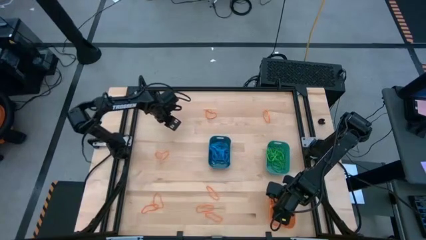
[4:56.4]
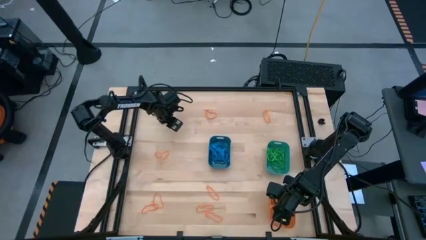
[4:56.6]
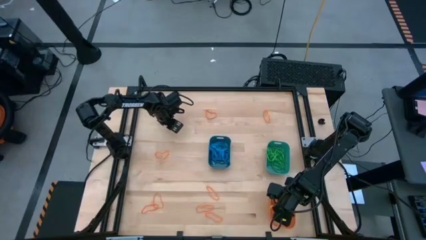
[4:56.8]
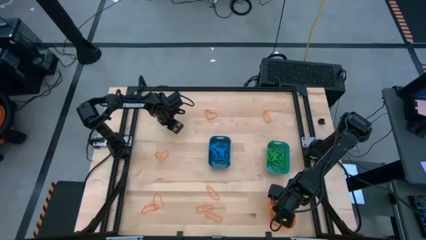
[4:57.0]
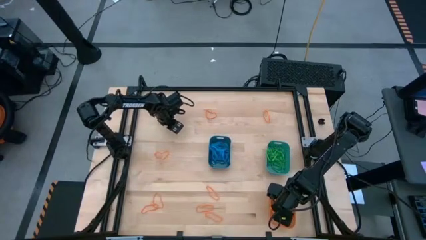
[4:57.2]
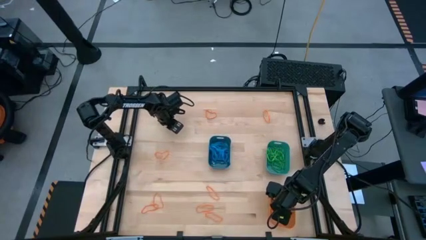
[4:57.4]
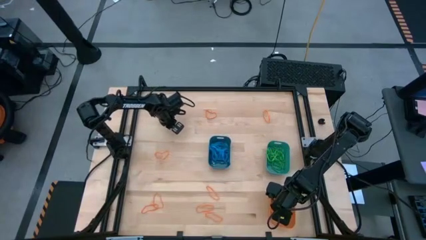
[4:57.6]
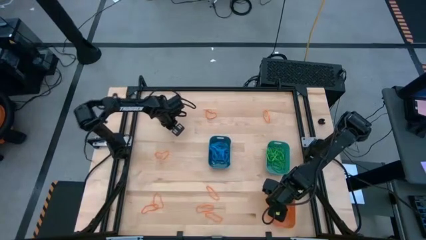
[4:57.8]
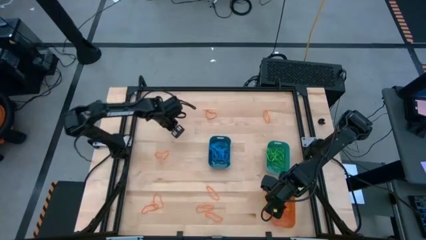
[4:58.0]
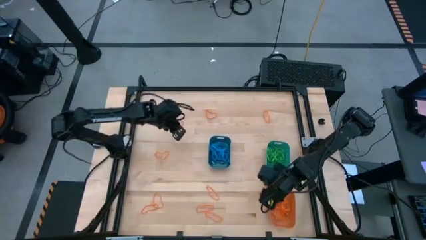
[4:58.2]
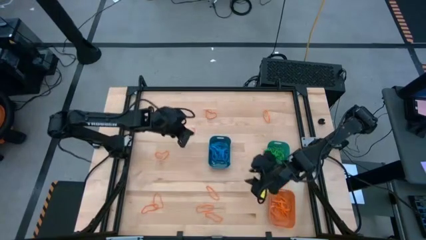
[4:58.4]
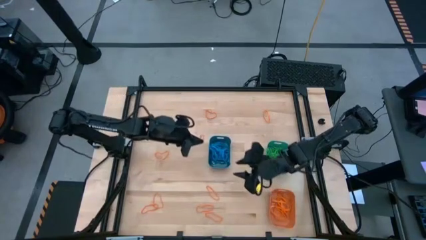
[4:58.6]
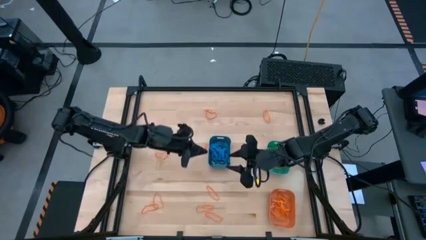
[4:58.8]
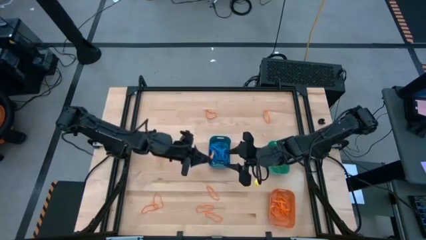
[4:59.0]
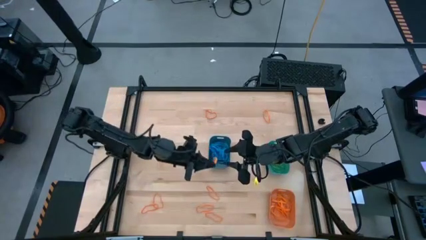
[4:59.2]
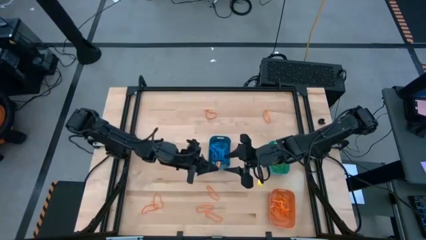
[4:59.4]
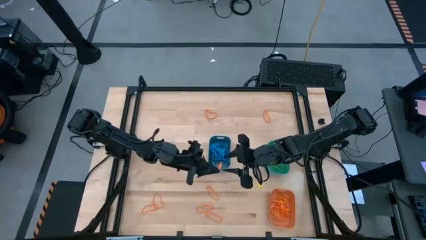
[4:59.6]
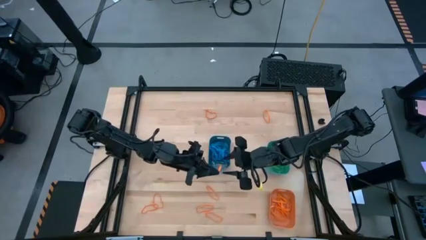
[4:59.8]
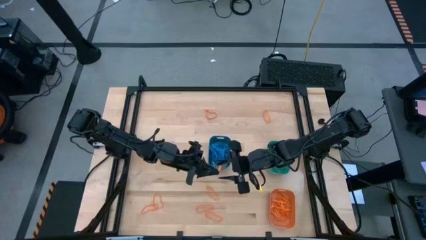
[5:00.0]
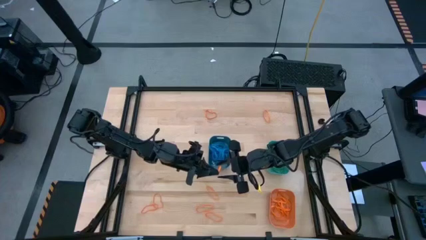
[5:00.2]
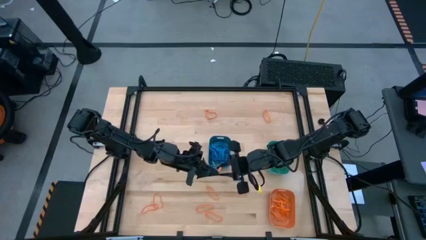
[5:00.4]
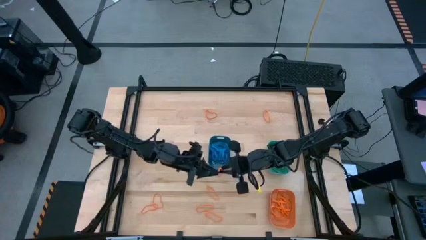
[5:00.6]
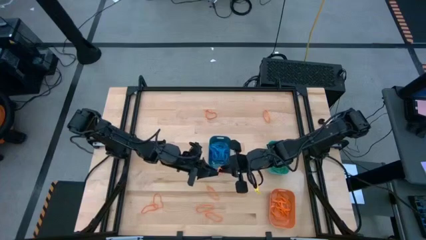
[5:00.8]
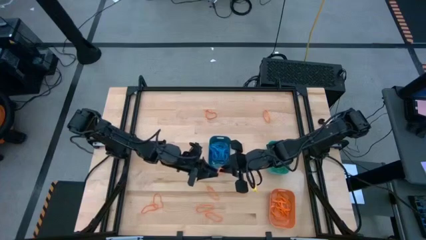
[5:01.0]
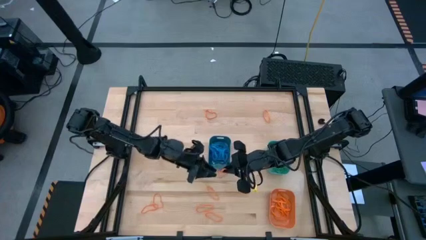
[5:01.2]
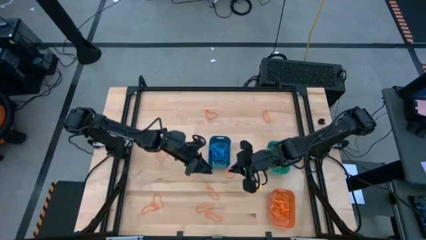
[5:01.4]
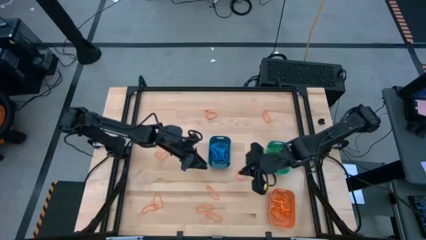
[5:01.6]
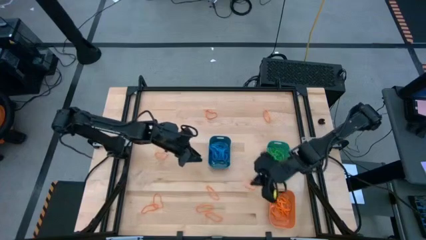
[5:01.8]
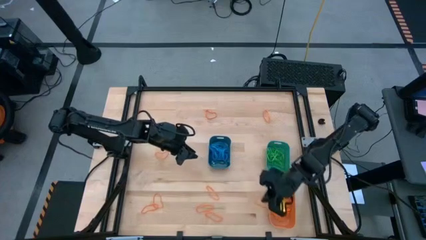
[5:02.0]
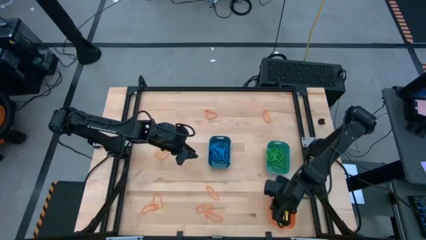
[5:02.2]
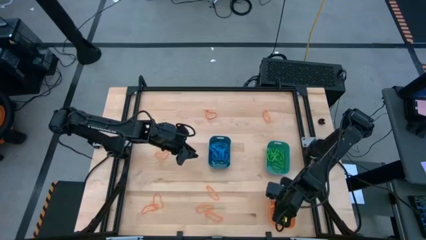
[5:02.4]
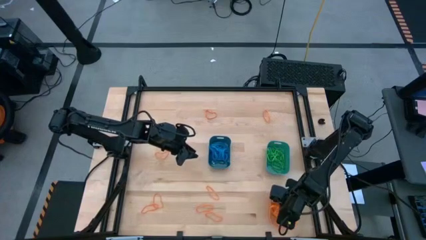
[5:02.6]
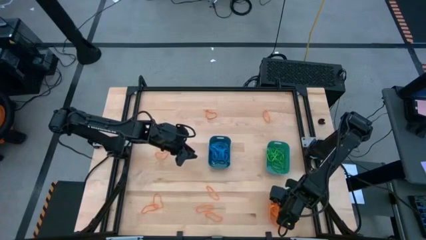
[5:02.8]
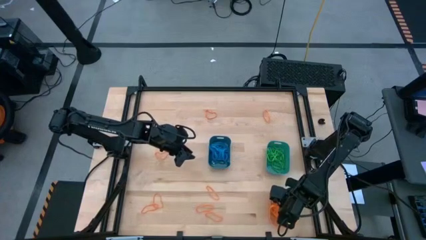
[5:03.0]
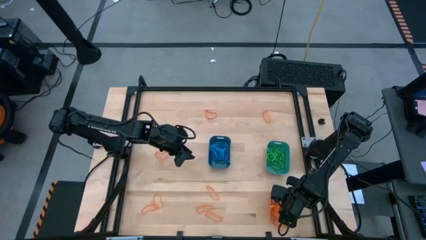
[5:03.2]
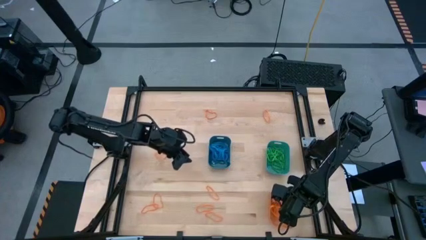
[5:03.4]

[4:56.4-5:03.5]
Task: Sort rubber bands into baskets
Put the orange rubberband into the orange bin

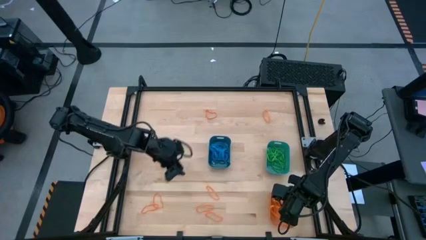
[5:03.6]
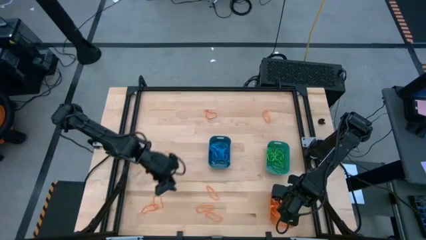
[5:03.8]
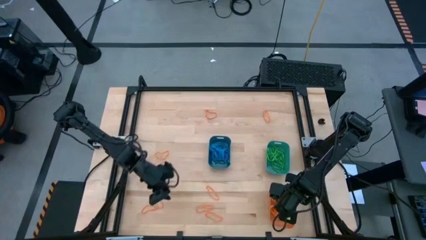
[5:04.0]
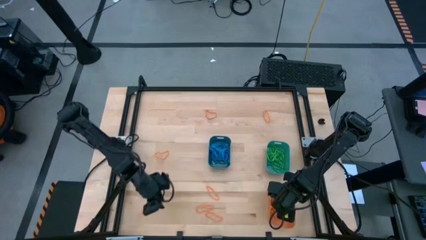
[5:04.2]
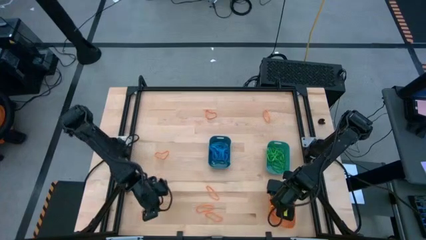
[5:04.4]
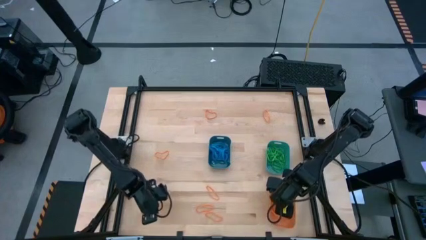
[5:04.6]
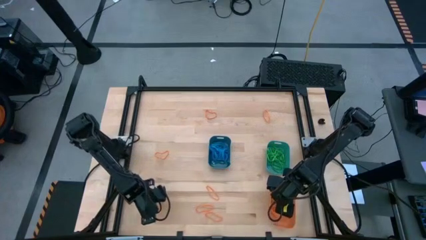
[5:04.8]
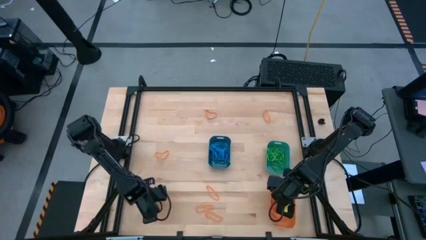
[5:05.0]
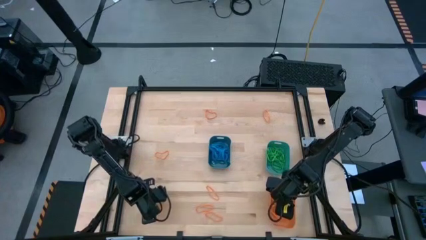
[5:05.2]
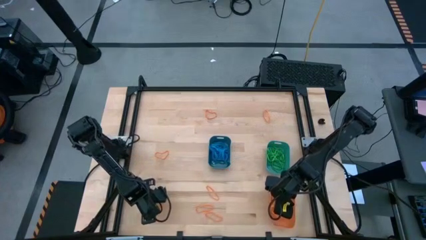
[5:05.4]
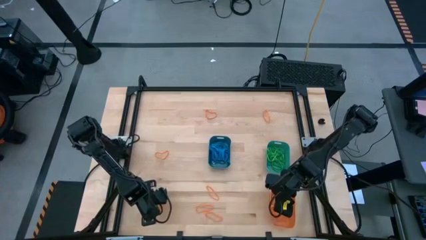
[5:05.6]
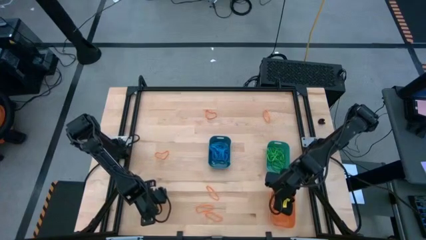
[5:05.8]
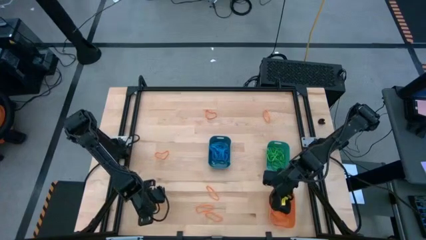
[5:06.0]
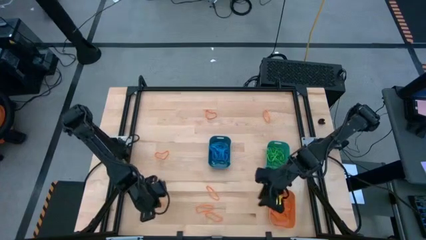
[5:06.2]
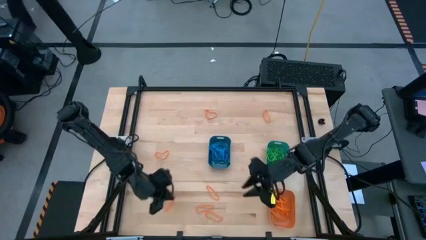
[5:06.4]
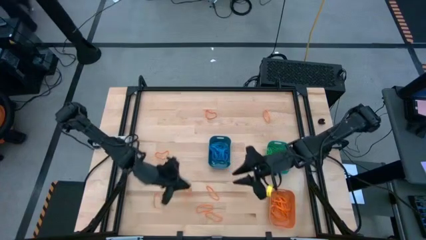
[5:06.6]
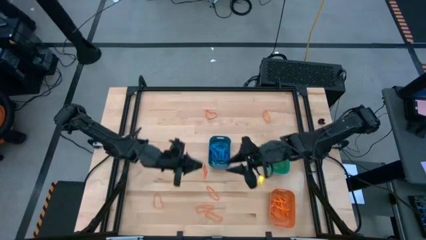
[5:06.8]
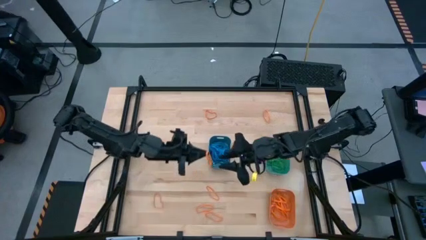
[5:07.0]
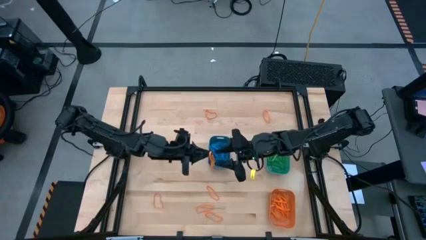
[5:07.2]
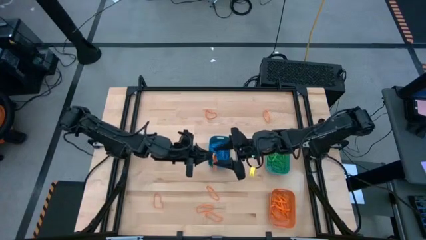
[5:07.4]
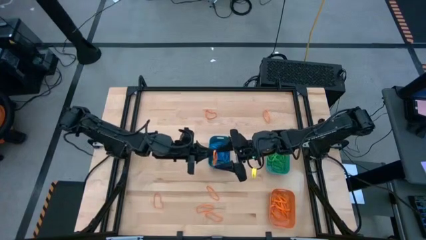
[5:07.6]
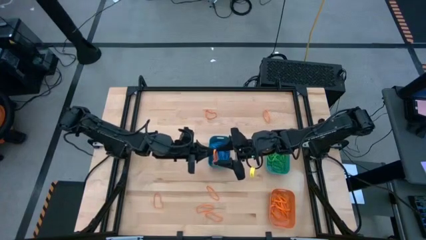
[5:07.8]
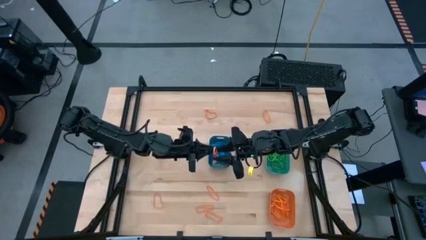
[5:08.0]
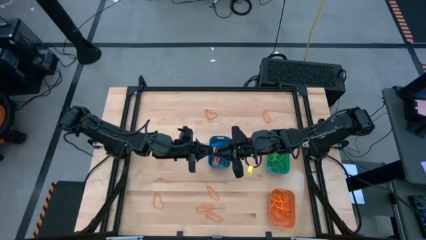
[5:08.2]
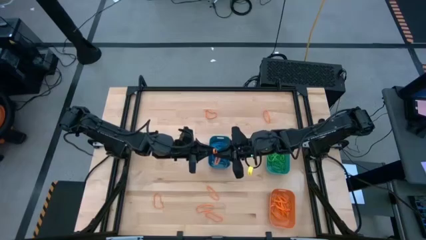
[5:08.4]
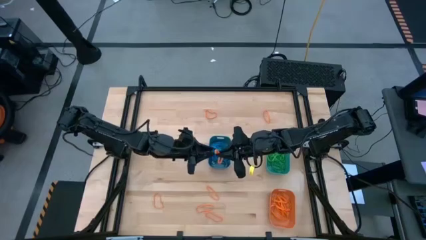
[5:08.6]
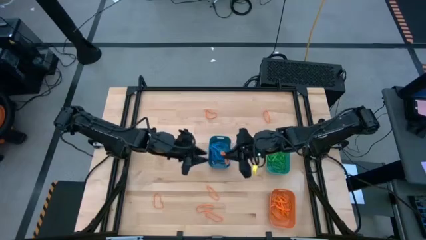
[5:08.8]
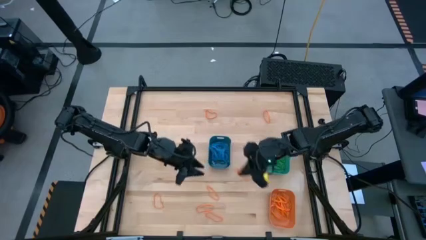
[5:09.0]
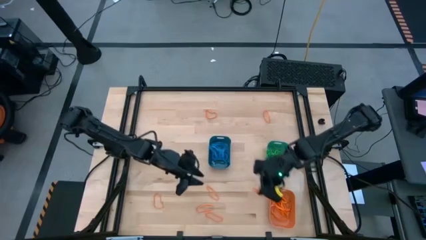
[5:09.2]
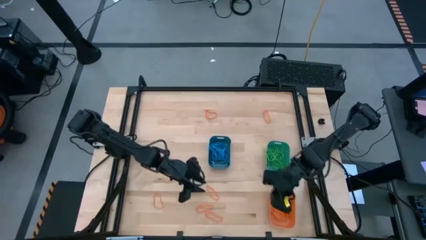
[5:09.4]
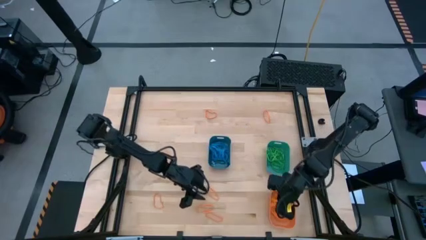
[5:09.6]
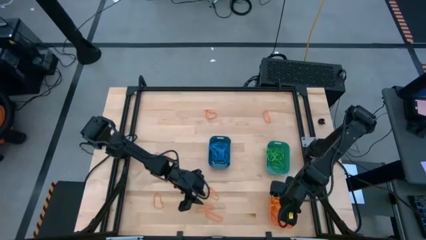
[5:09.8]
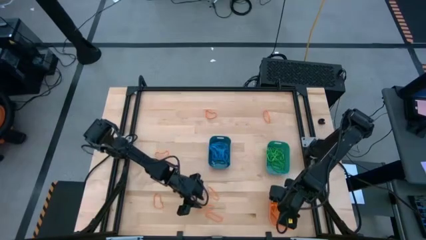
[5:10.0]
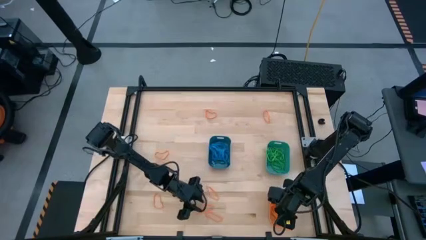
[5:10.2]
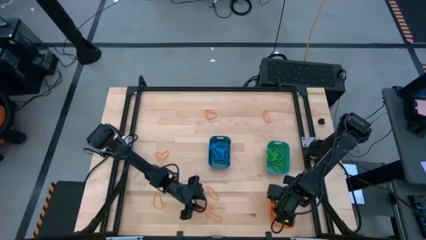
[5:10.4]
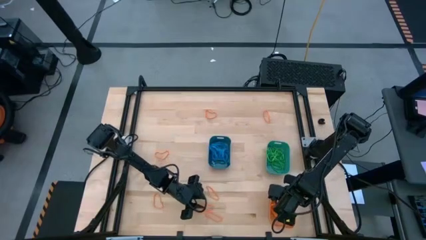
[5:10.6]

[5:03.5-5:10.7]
Put the orange rubberband into the orange bin
